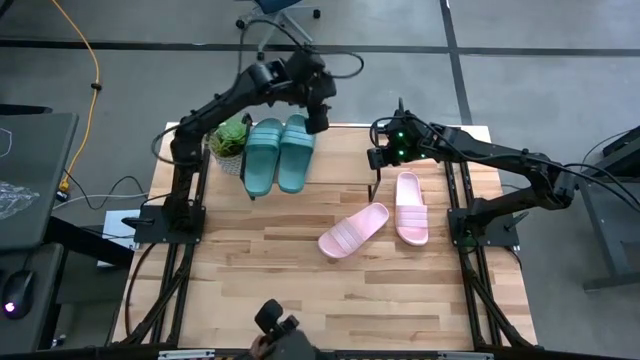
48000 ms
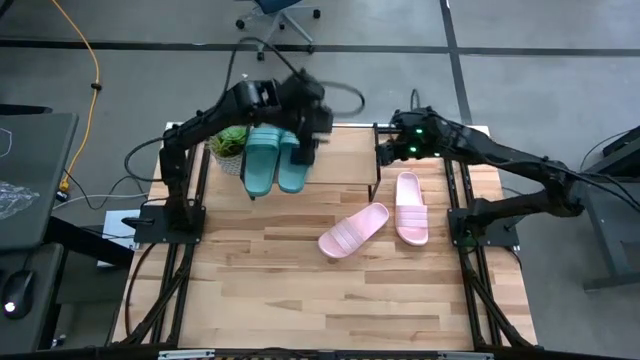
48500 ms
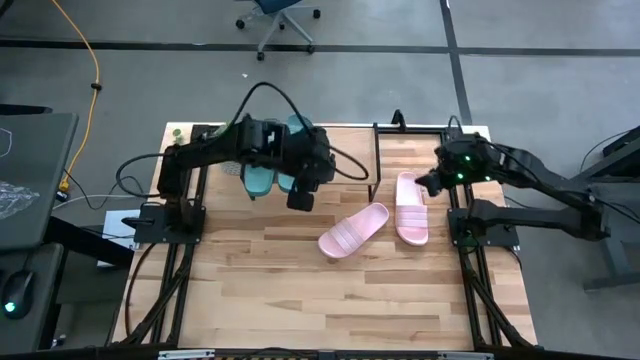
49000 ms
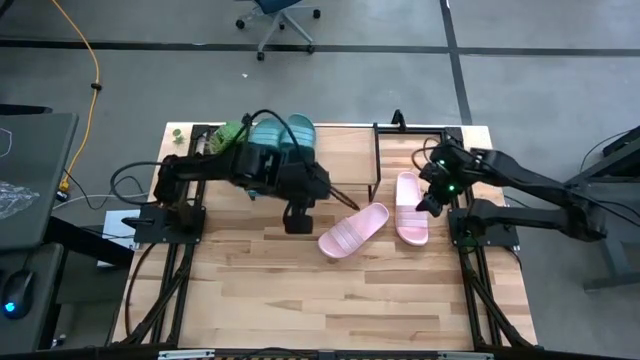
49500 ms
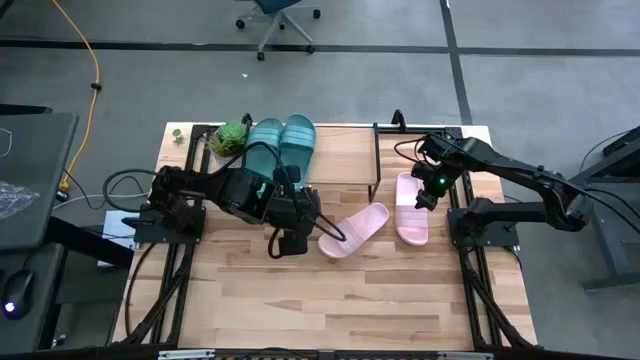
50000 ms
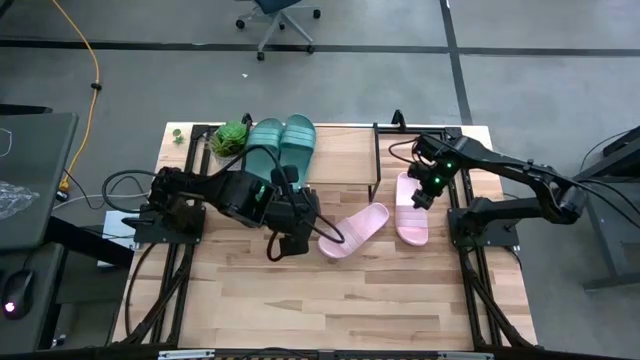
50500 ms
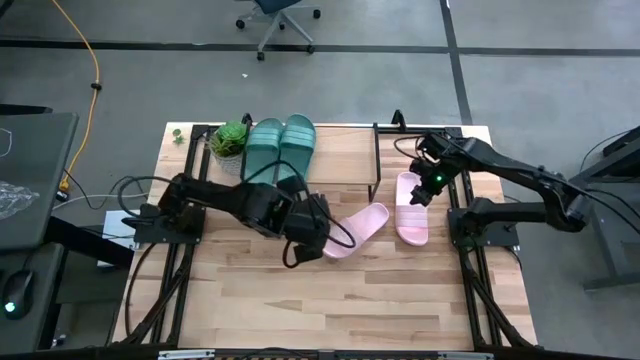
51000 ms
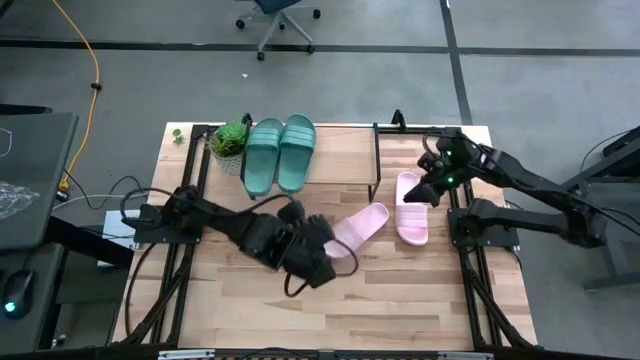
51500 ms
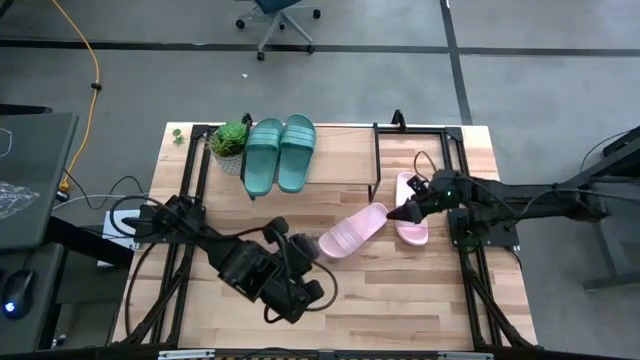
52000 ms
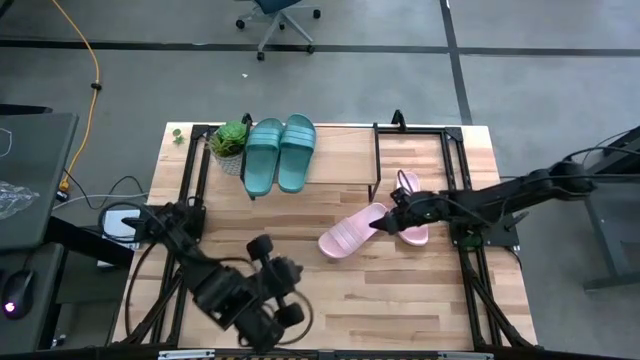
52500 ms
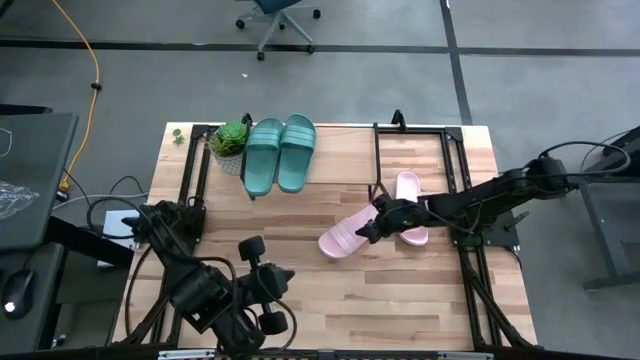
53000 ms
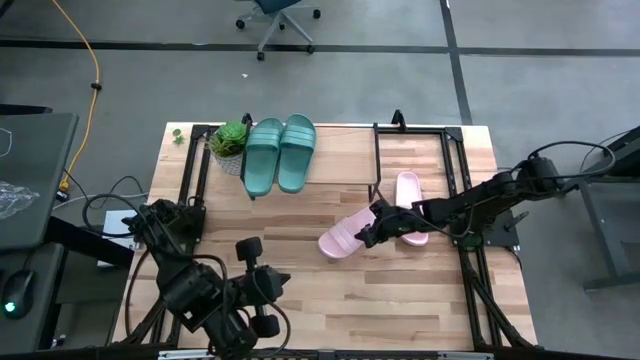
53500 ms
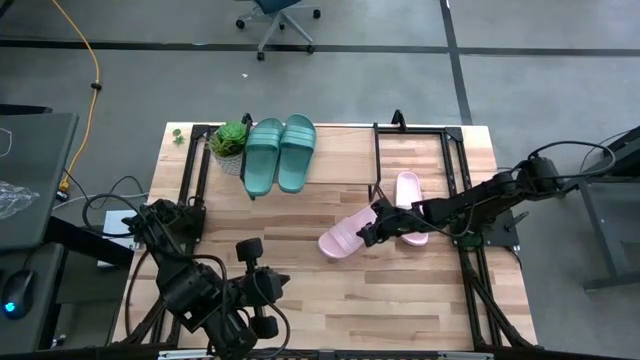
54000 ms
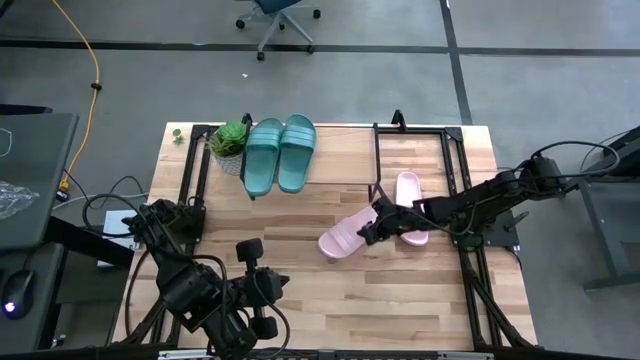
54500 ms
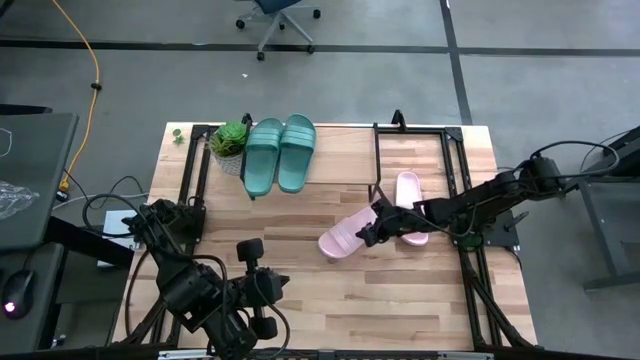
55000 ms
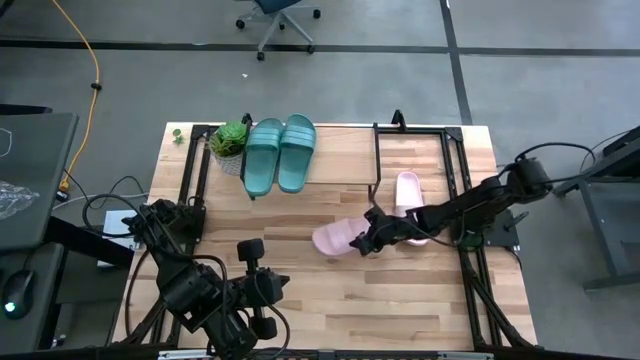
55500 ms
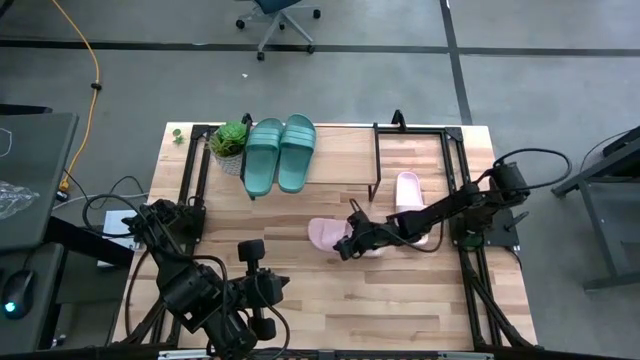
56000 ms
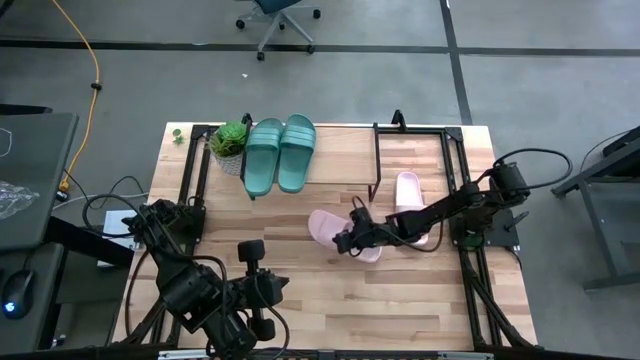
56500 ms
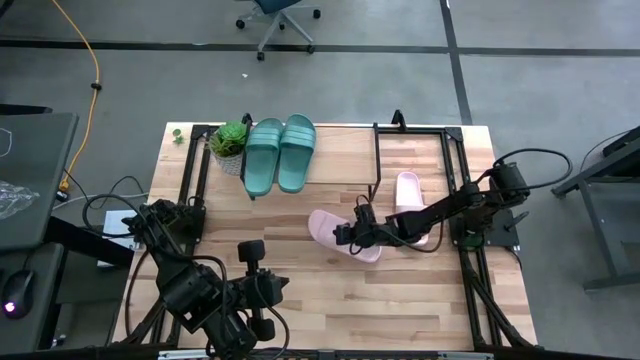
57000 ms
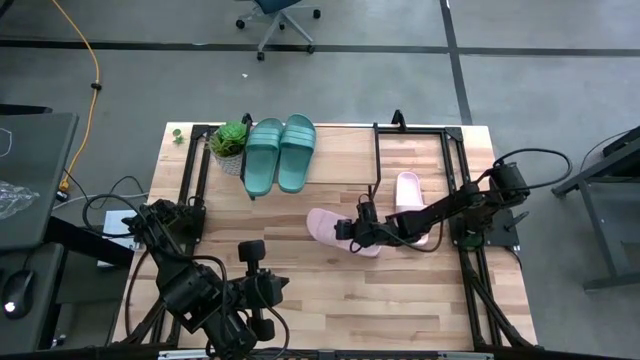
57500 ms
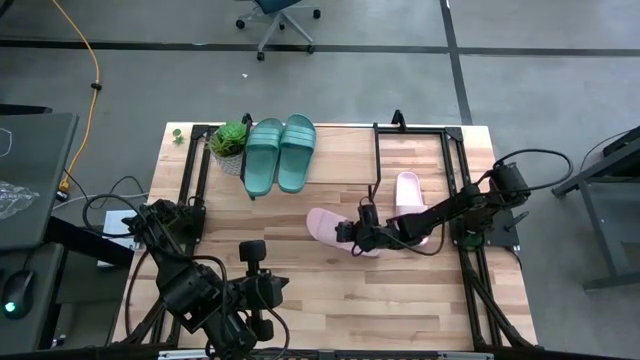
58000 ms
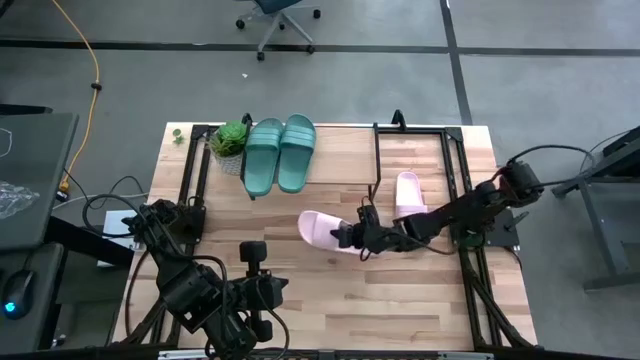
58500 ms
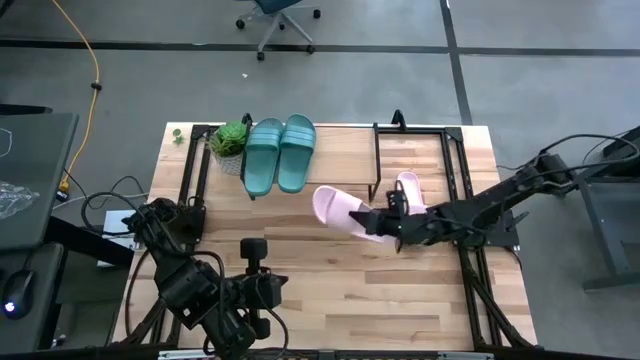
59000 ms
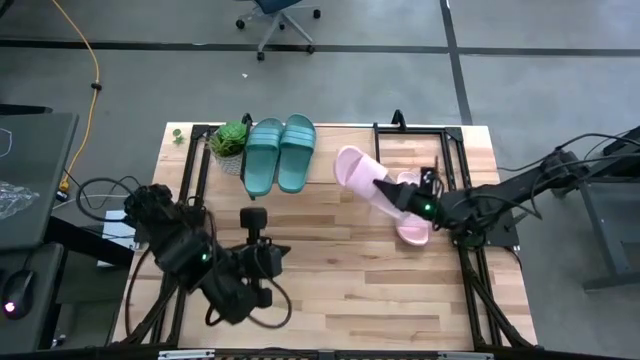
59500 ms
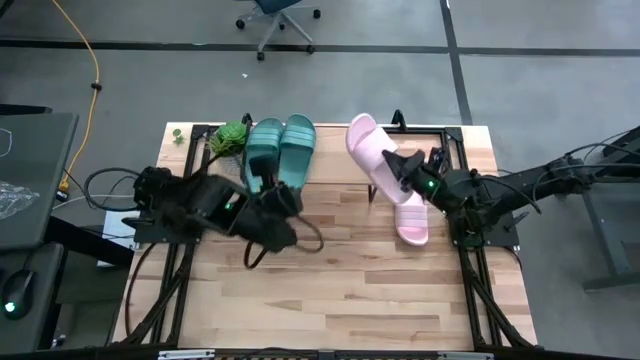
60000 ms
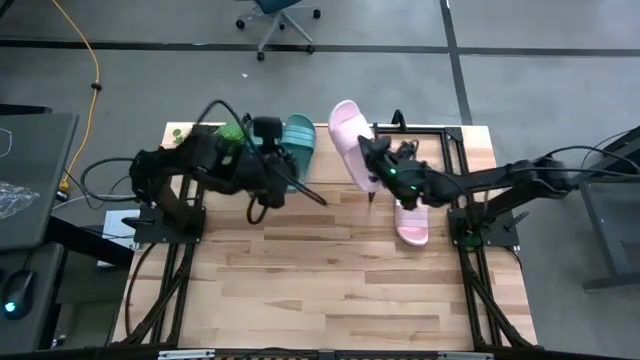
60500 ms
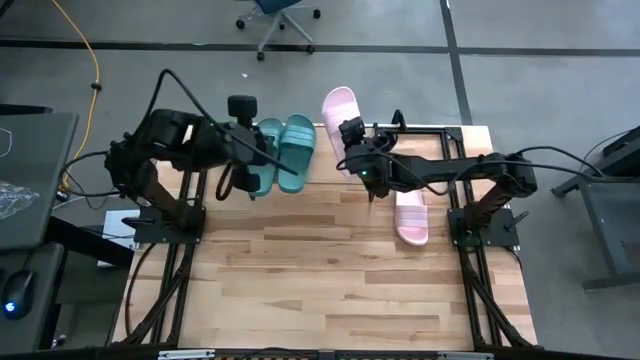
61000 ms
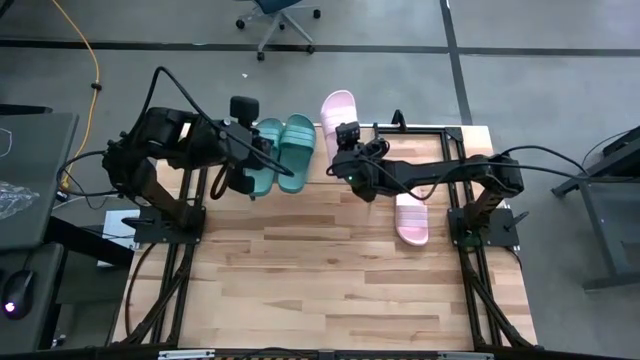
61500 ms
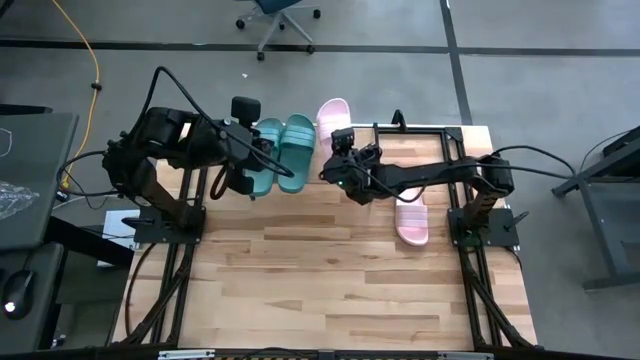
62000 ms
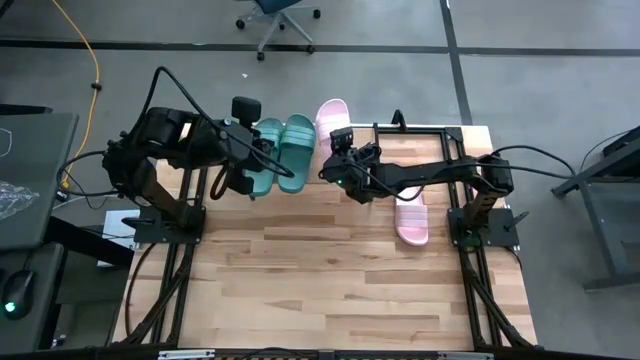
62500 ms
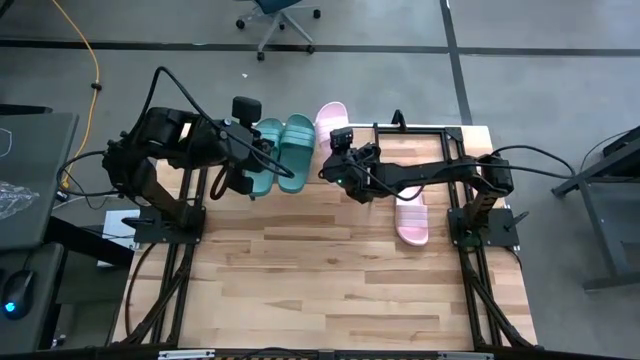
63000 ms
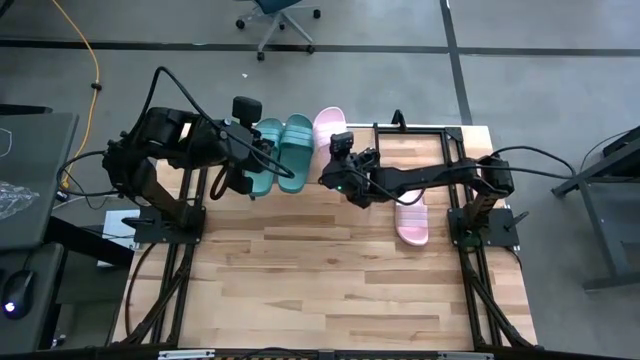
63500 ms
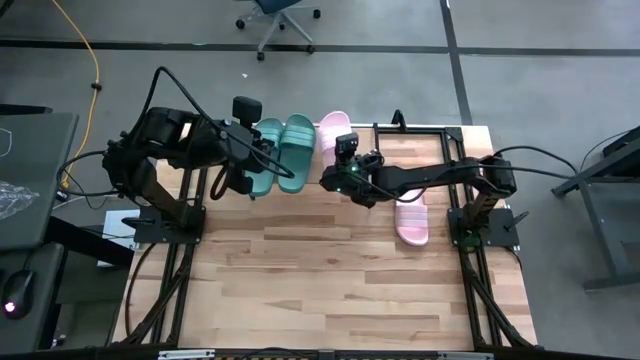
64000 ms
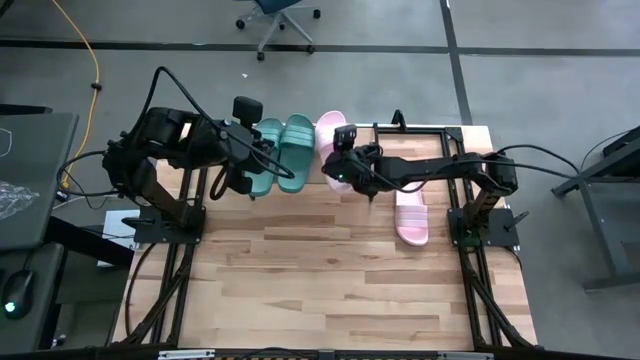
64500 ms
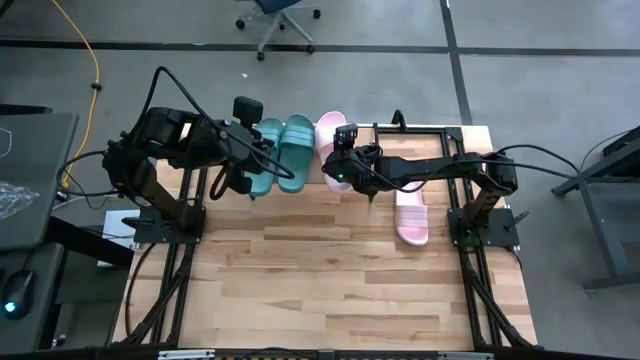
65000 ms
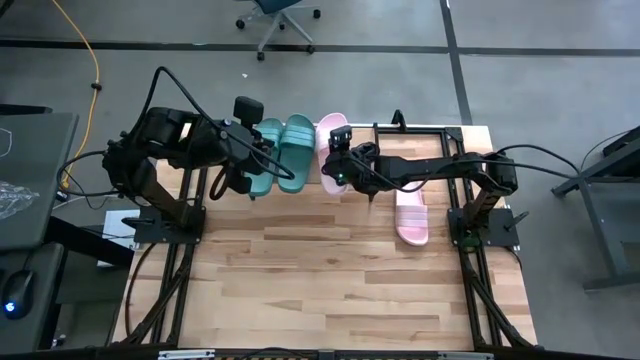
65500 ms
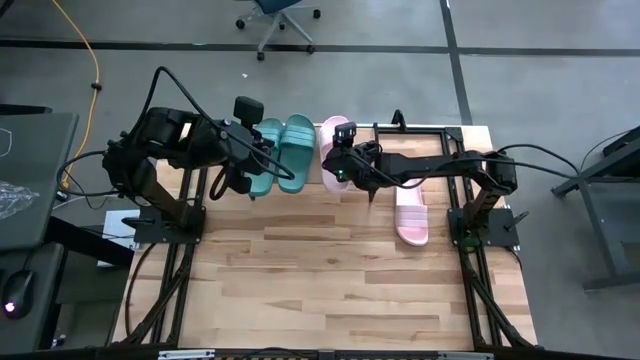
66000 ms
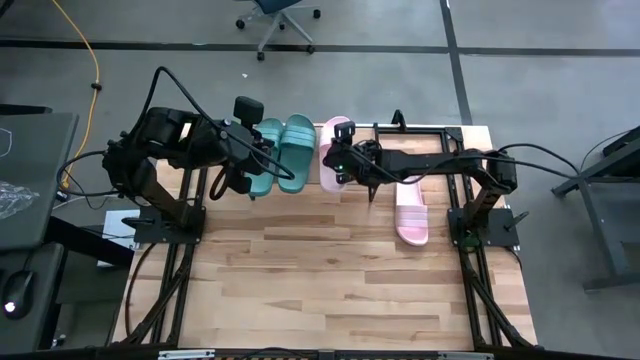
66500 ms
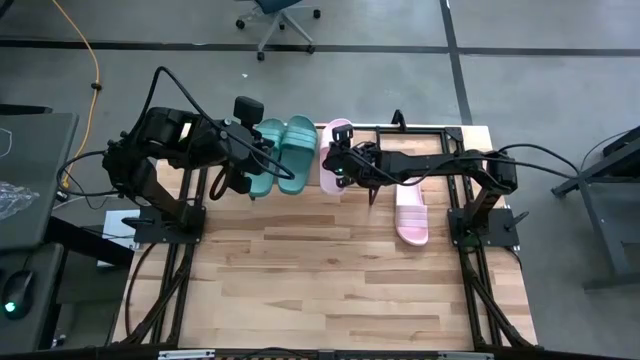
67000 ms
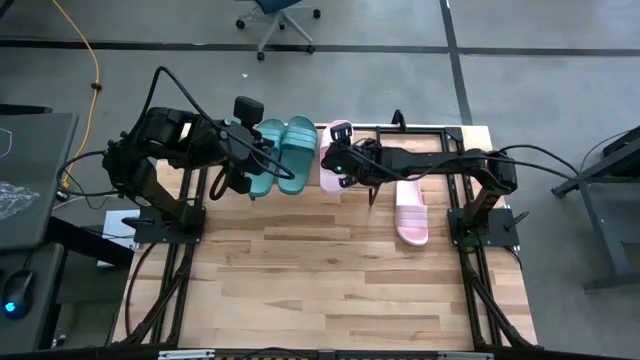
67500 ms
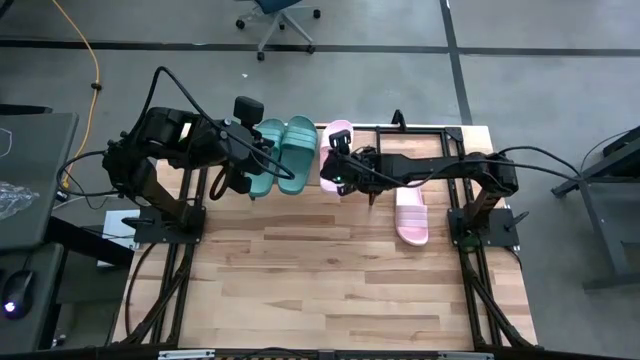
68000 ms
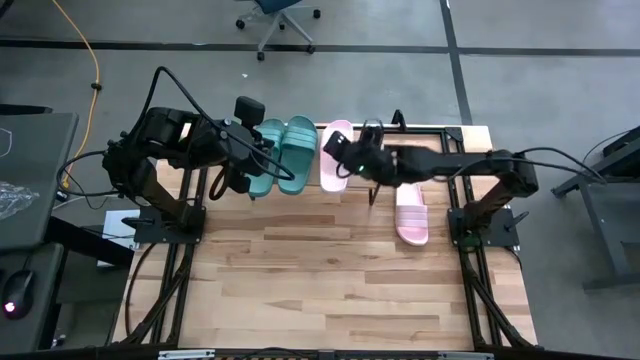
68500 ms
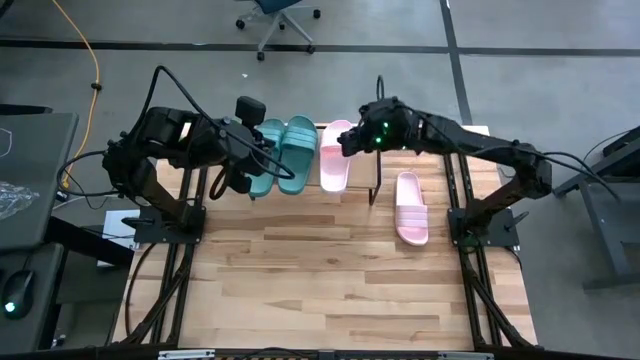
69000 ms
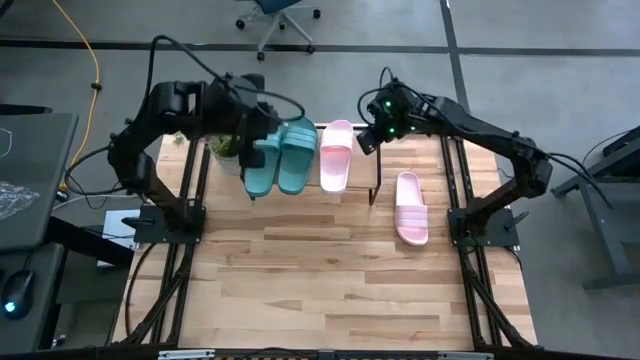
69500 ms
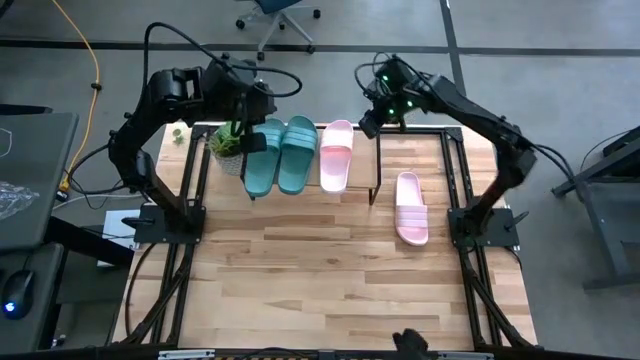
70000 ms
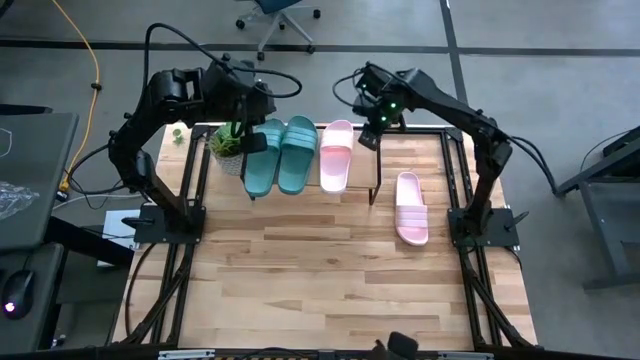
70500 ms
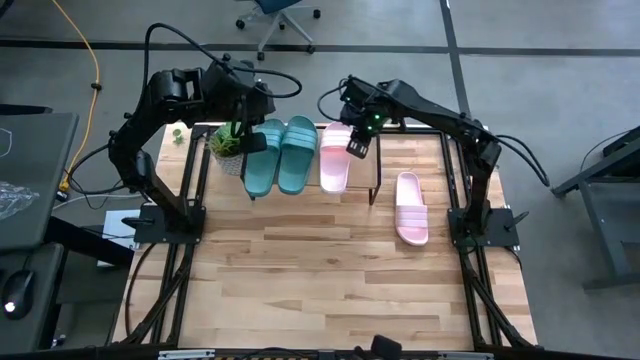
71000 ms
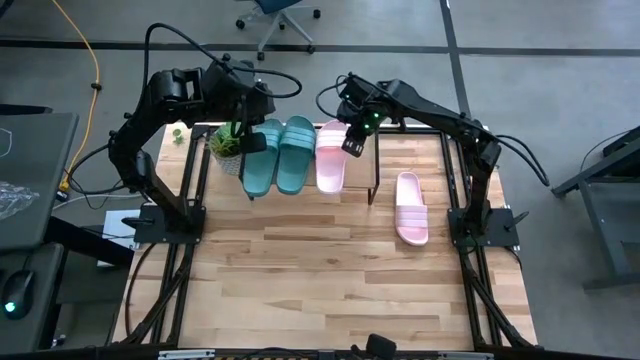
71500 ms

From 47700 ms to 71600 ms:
Task: Pick and place slides into the shelf
Put the left pink slide on the shelf
